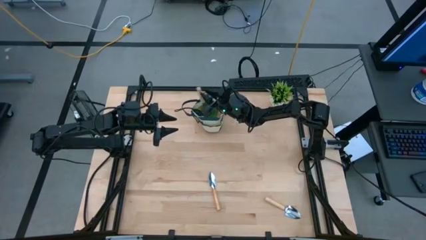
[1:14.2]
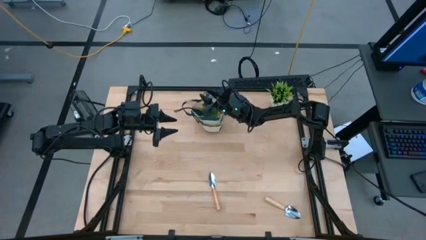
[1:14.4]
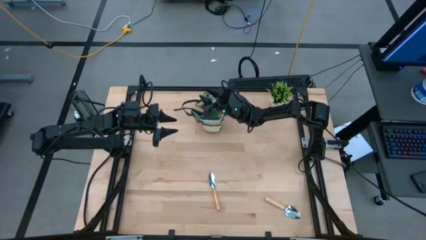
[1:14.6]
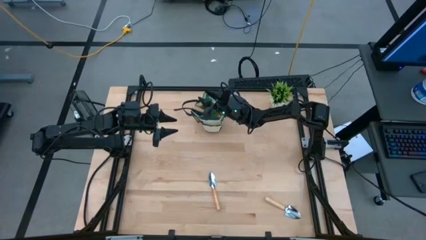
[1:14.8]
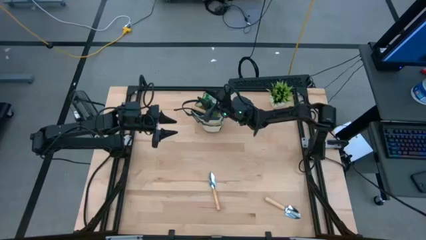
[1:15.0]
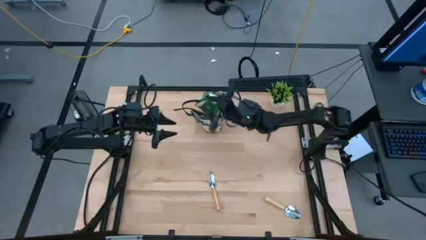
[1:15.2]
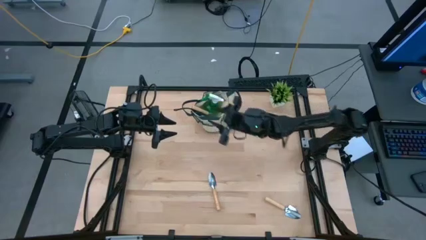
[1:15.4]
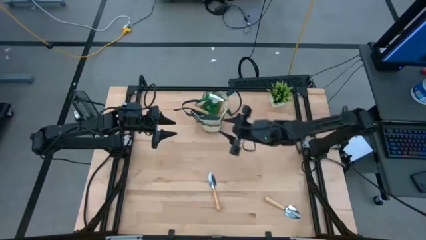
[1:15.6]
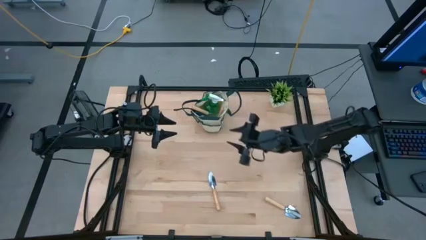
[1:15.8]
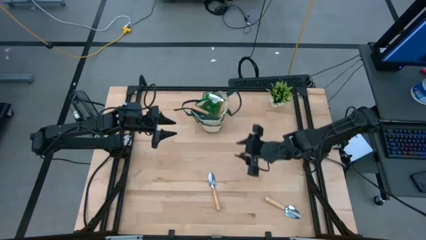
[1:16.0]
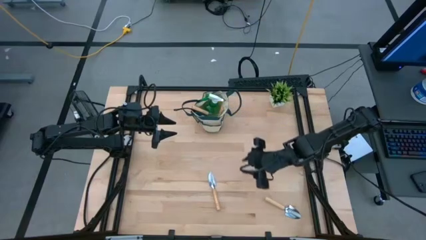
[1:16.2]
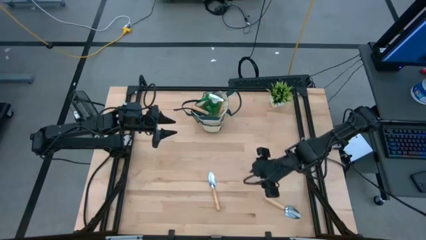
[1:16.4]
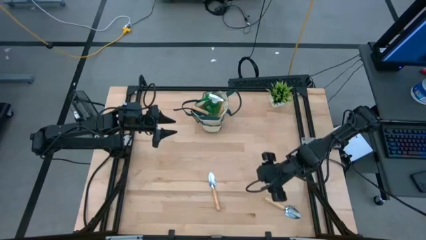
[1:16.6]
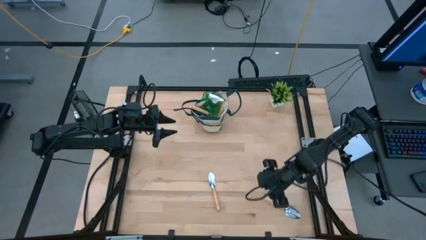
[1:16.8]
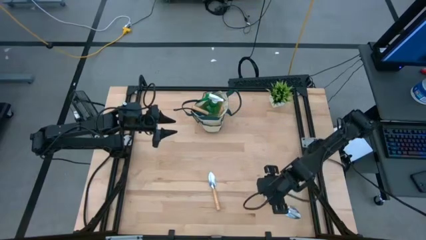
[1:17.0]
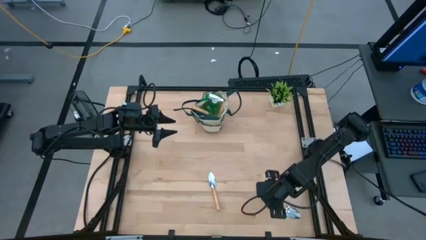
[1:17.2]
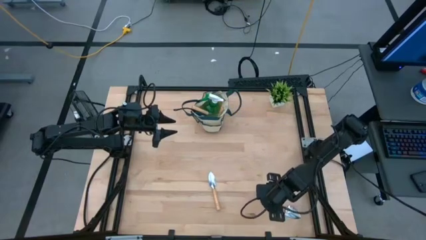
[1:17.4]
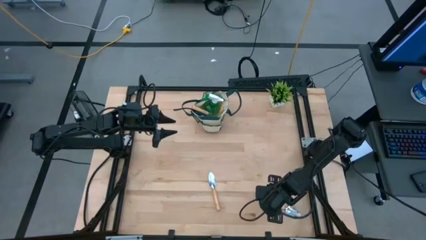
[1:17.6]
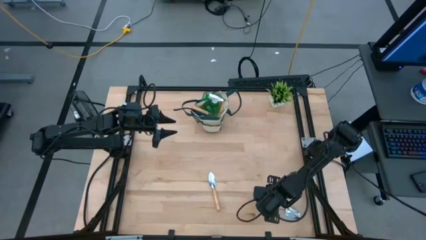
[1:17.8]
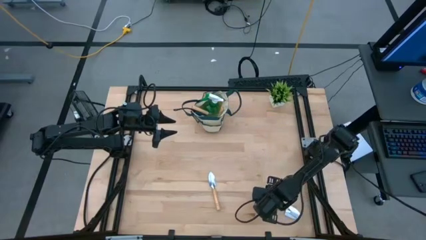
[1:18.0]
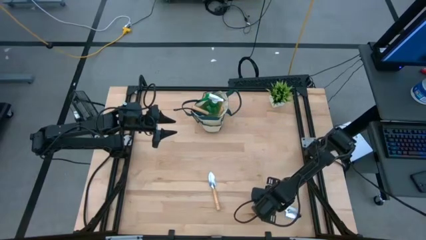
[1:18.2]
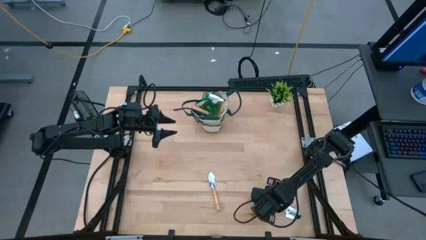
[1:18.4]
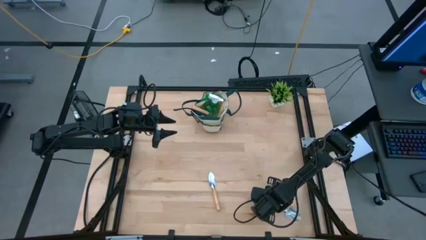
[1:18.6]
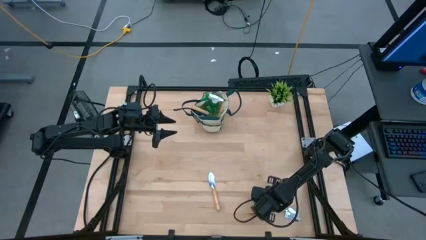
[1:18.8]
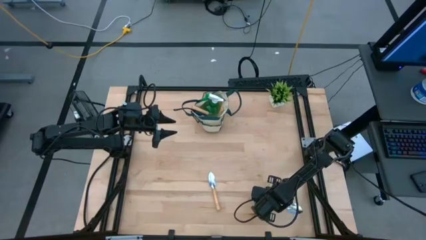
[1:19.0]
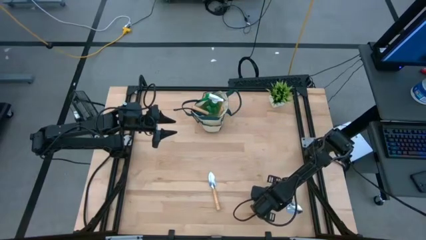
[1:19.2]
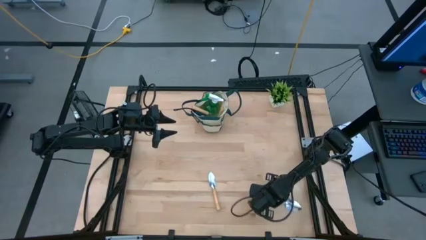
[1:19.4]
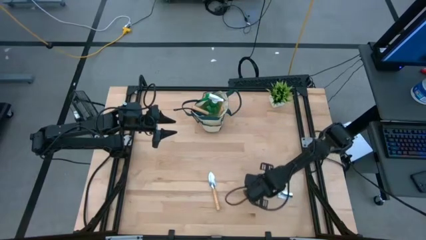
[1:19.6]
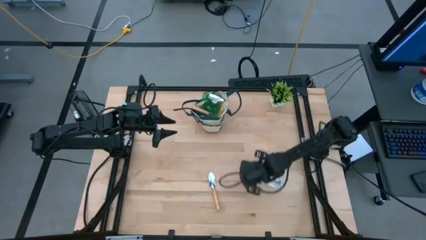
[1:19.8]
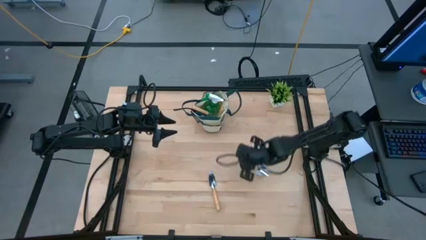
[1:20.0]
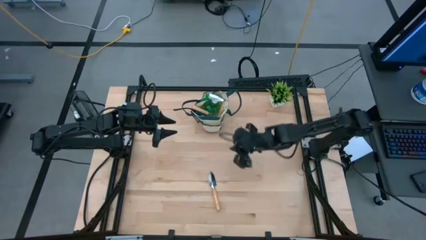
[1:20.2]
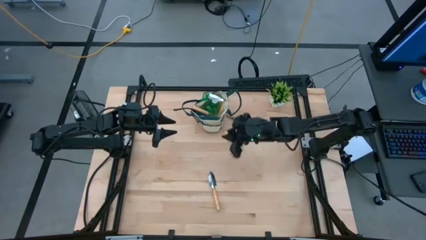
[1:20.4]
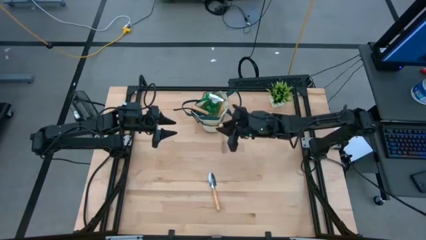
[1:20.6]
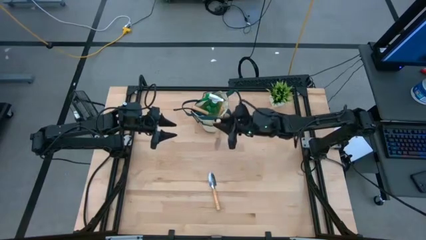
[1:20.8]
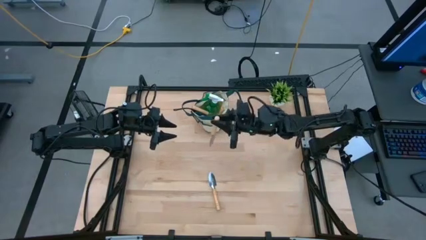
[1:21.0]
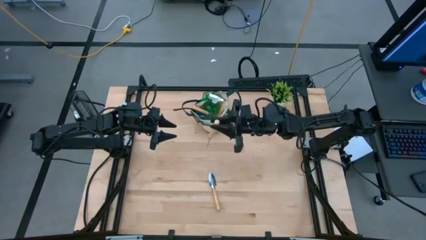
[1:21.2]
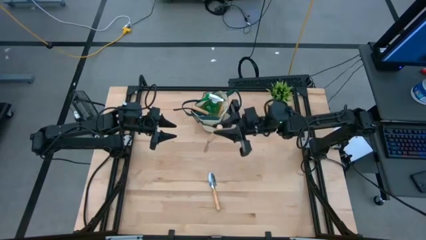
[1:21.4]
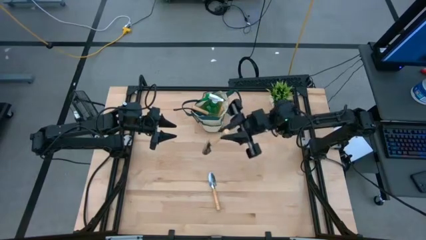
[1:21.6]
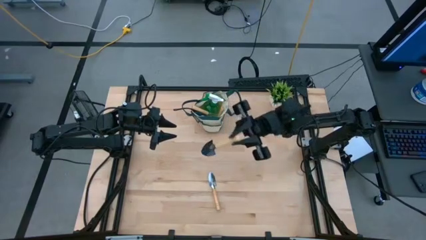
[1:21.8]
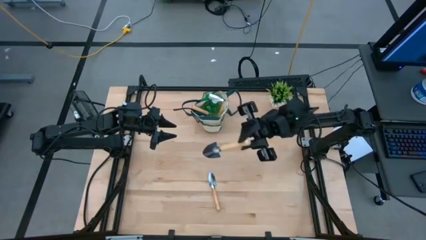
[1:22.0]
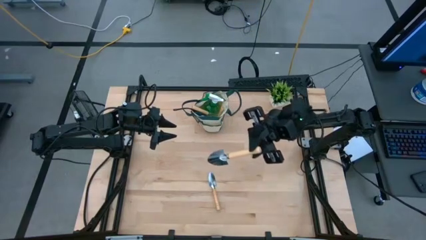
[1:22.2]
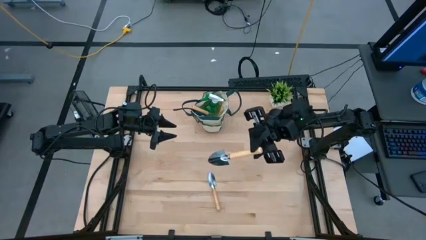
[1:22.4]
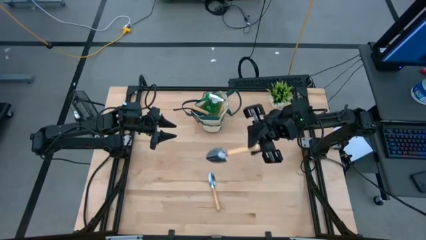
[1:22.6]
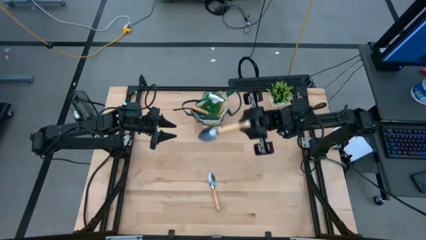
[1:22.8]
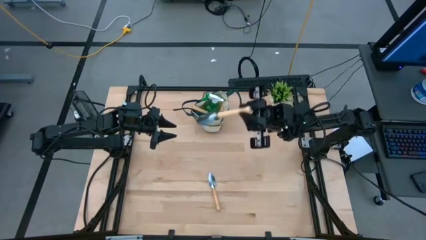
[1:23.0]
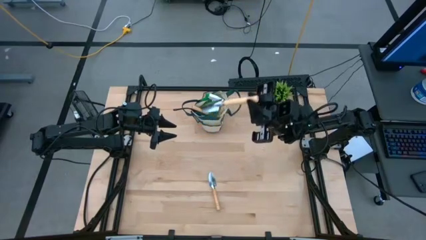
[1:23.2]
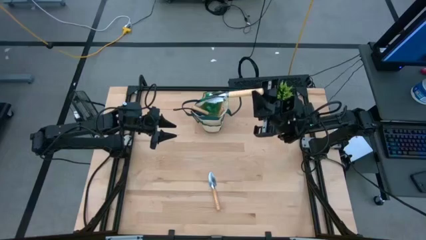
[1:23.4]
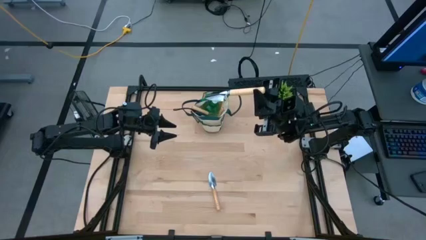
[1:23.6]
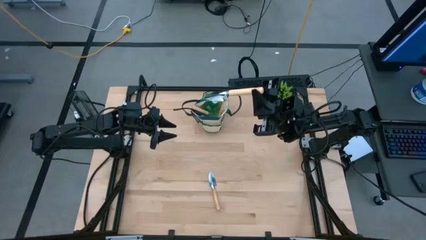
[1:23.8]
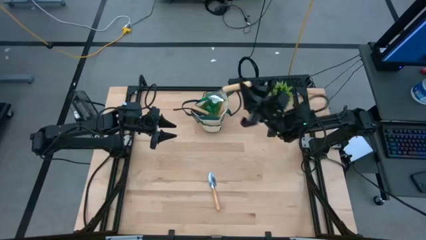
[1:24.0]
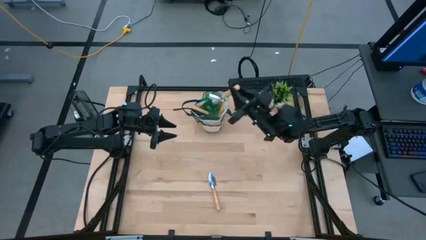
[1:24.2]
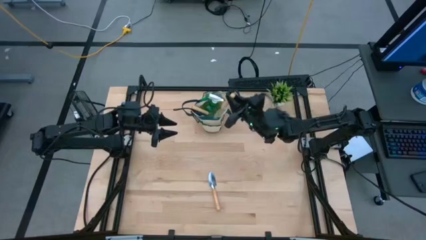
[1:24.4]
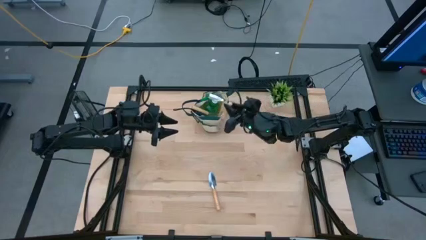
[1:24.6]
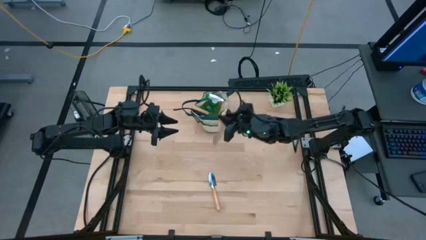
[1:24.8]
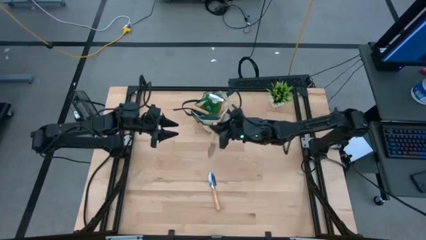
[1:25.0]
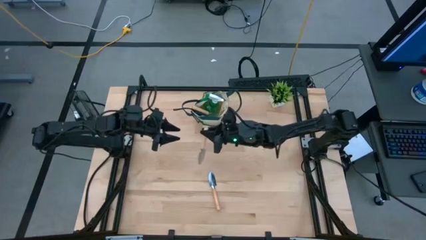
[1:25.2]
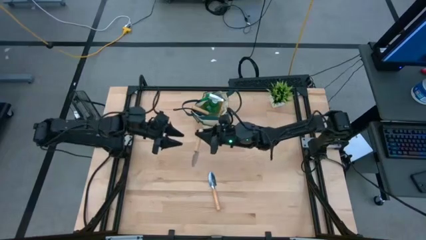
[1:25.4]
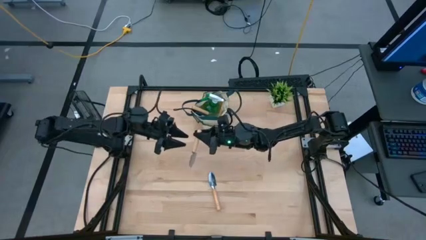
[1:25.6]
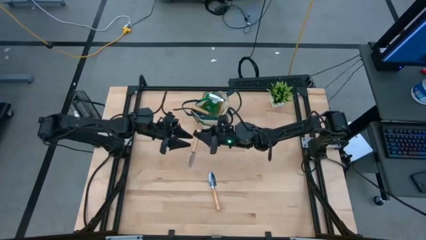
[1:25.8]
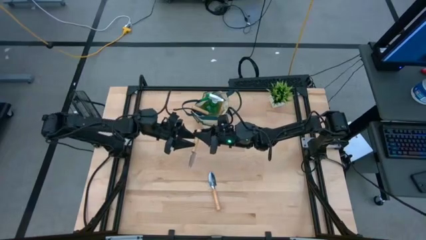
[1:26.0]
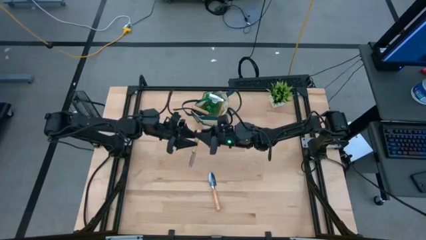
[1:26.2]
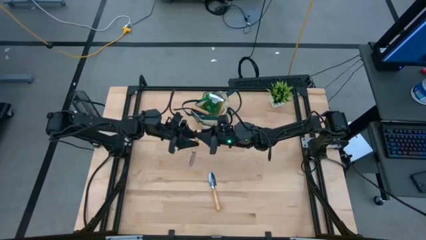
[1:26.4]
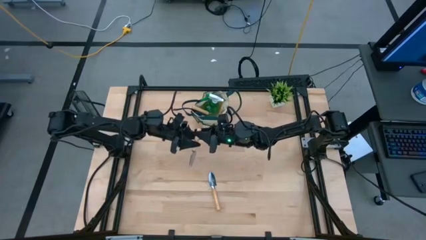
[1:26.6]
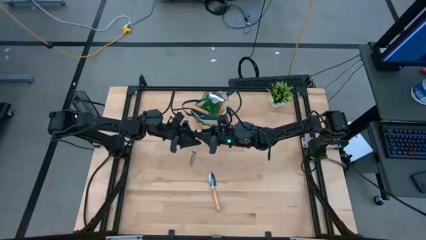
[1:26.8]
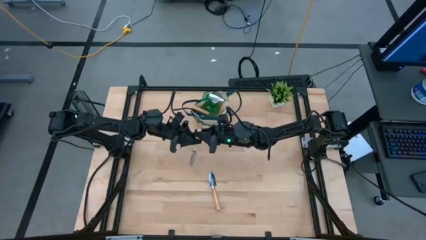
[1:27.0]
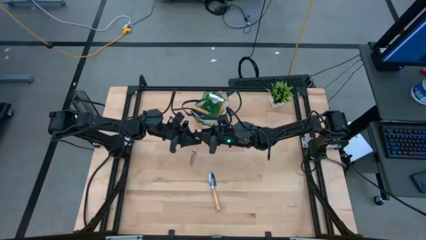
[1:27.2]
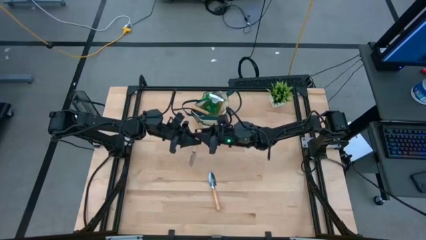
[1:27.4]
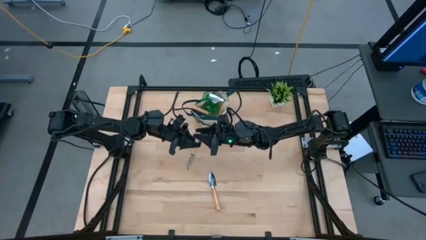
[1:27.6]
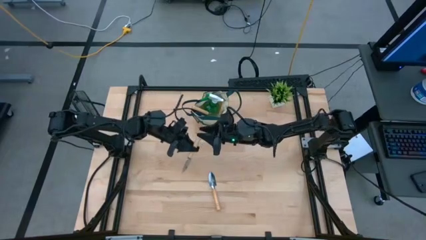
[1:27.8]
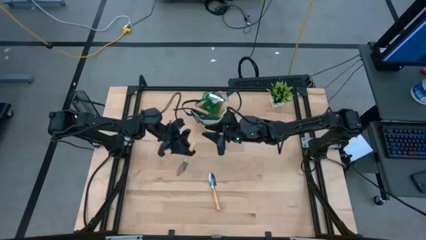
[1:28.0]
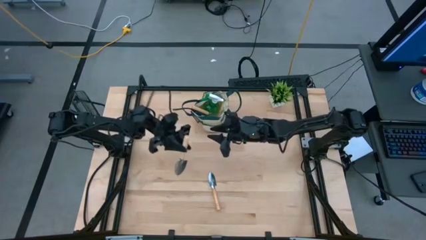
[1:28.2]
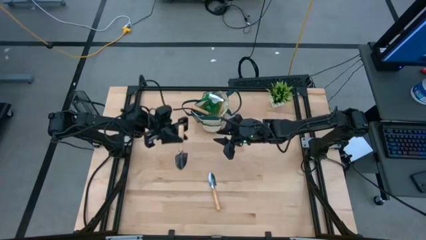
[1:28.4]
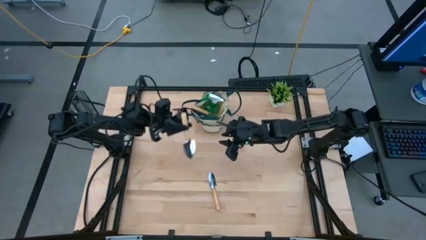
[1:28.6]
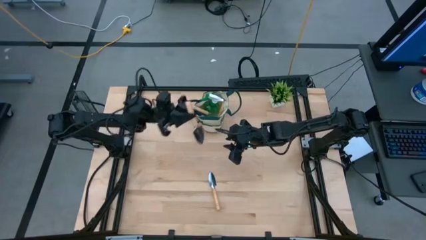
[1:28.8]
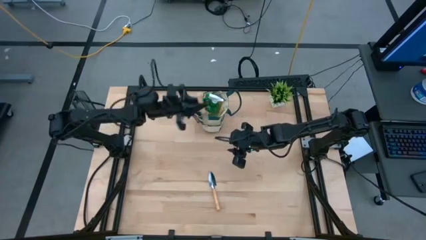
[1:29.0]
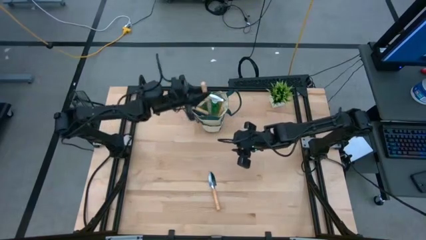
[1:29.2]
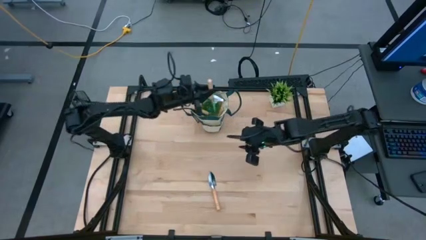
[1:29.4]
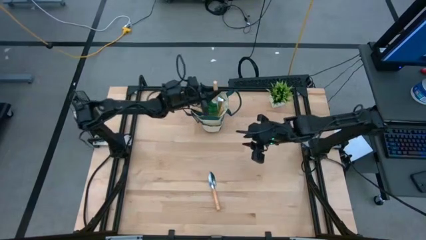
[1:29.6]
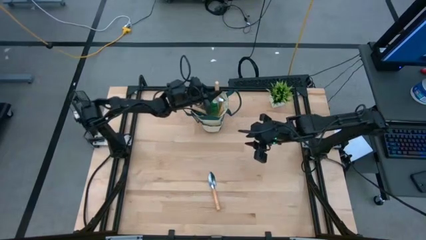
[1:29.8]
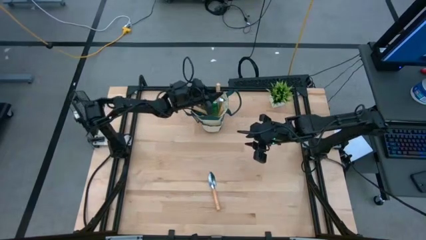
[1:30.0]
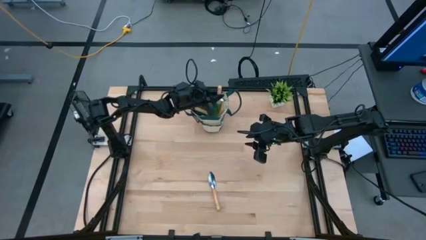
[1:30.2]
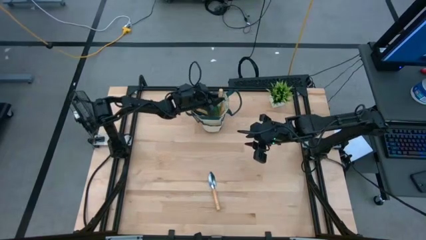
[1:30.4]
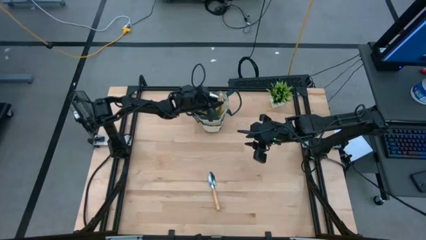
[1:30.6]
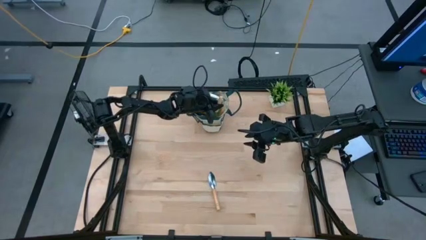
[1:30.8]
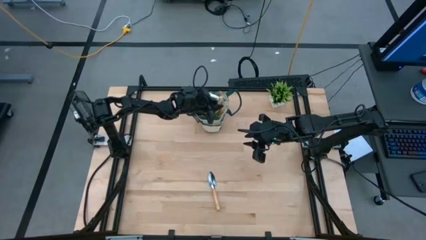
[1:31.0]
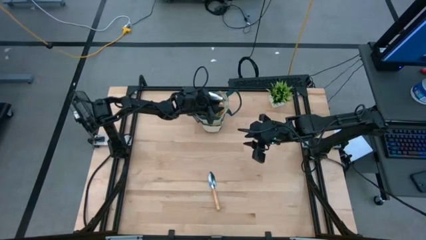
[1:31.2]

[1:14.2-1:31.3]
Task: Pick & Place Garden tools in Gardening bag
Put the right brown trowel into the gardening bag

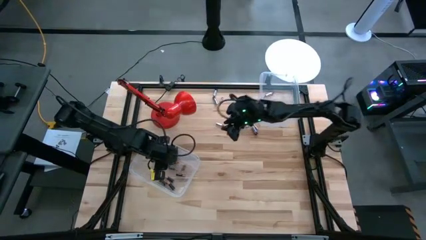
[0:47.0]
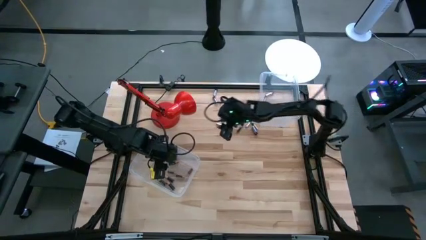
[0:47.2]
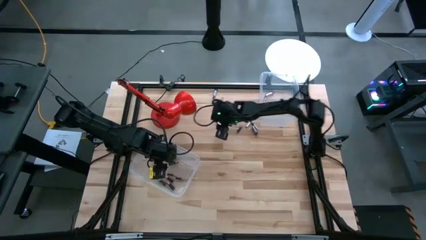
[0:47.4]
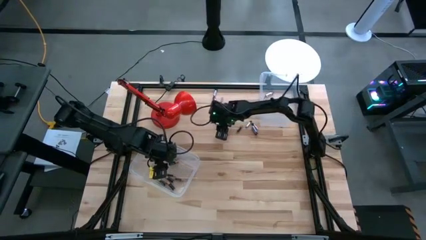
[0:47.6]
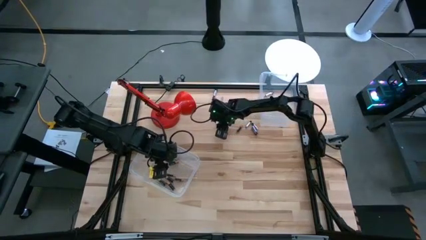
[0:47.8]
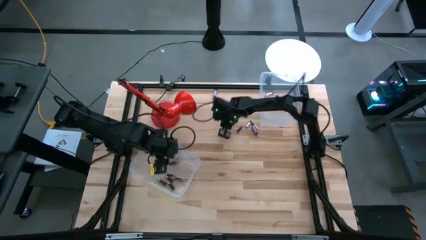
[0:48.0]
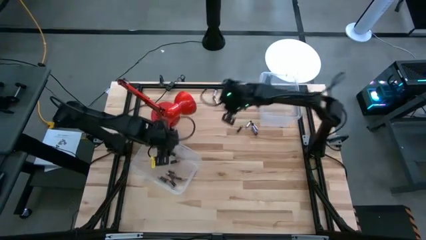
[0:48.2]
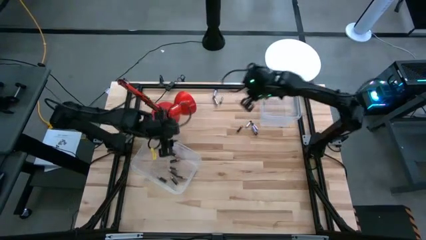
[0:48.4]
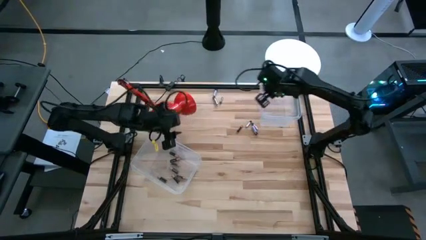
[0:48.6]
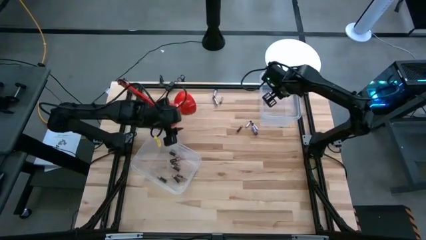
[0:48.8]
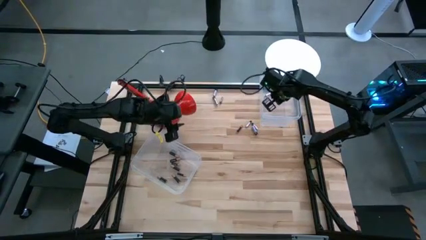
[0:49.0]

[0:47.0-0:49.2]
Task: Sort batteries
Put the silver battery into the top transparent bin
